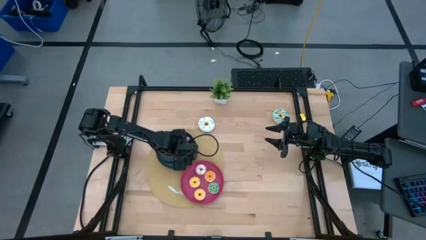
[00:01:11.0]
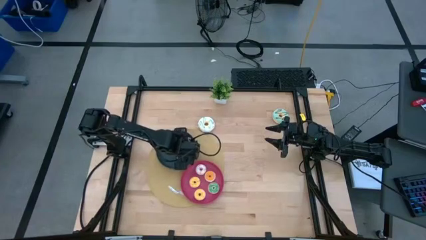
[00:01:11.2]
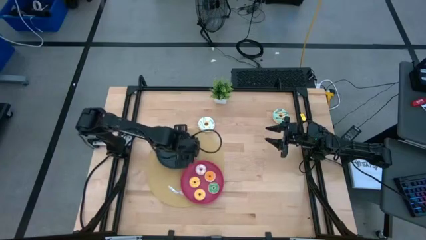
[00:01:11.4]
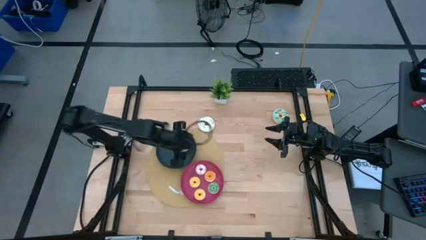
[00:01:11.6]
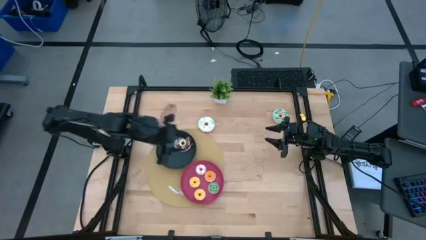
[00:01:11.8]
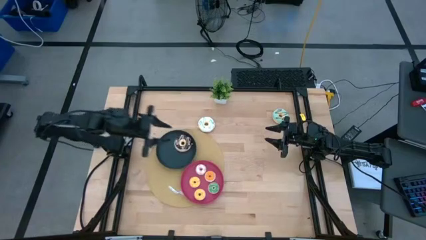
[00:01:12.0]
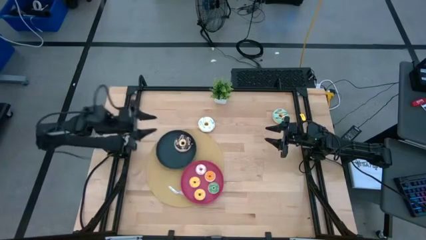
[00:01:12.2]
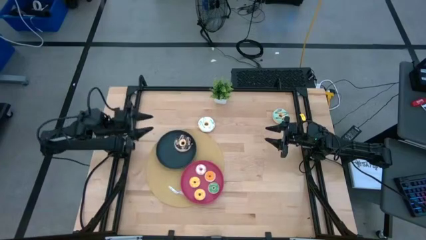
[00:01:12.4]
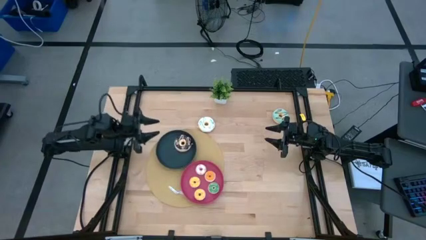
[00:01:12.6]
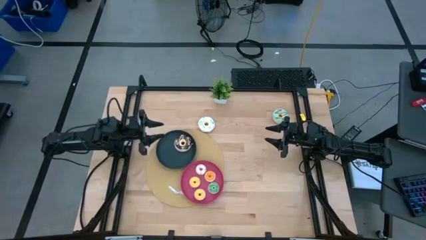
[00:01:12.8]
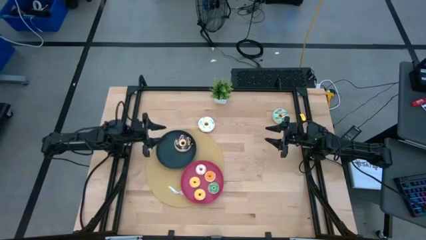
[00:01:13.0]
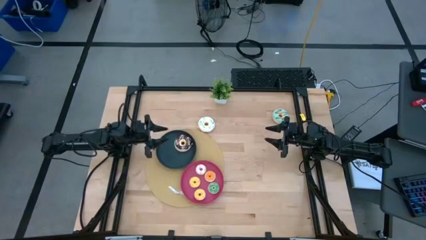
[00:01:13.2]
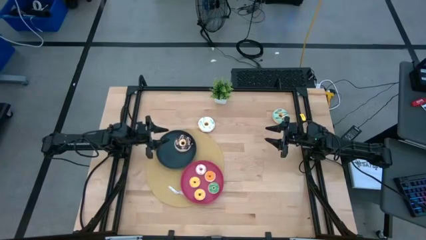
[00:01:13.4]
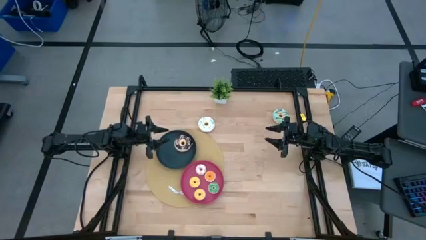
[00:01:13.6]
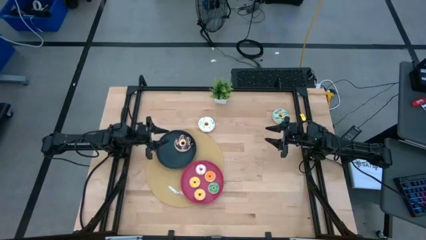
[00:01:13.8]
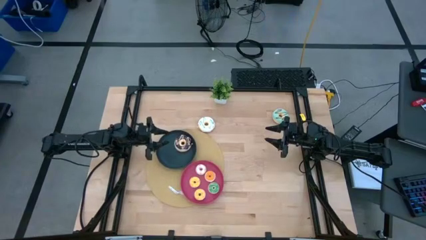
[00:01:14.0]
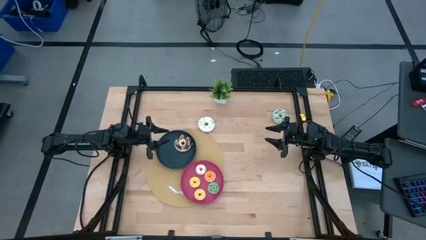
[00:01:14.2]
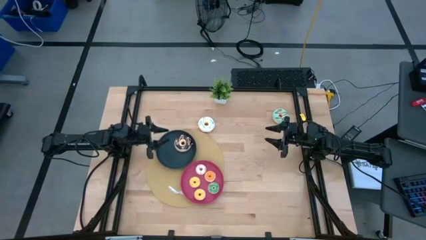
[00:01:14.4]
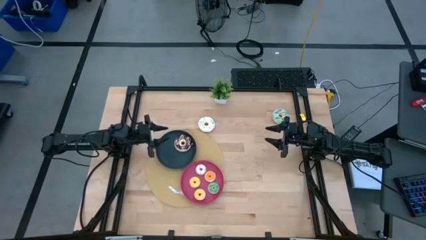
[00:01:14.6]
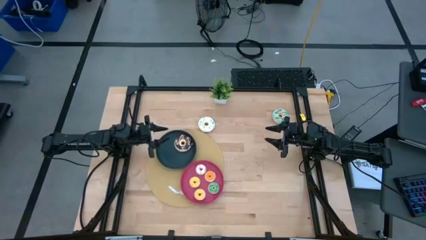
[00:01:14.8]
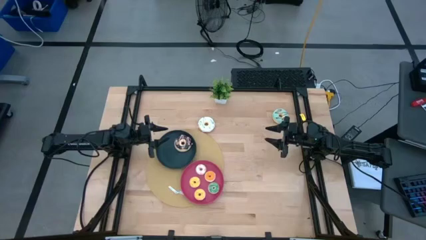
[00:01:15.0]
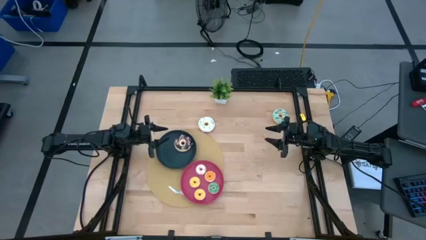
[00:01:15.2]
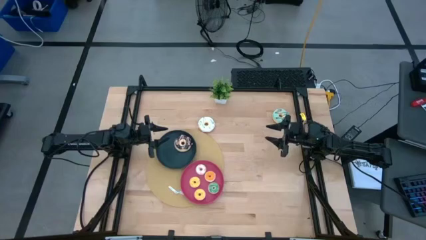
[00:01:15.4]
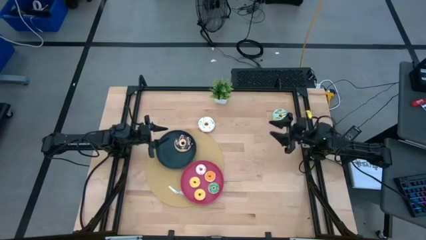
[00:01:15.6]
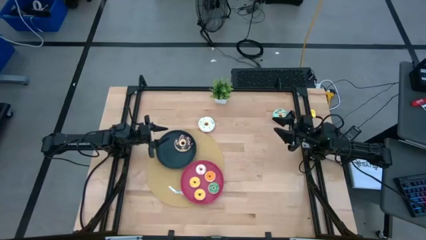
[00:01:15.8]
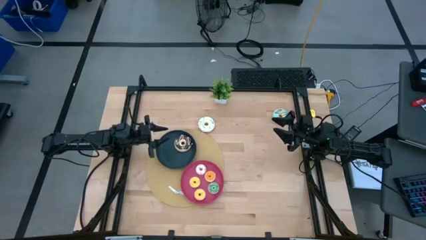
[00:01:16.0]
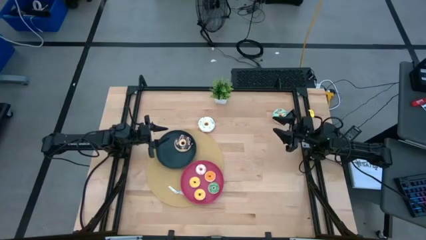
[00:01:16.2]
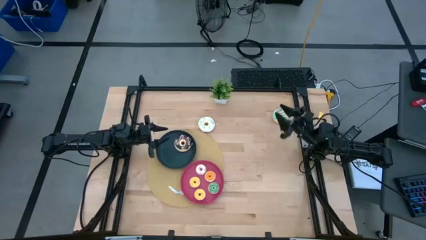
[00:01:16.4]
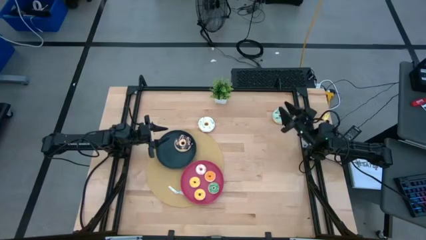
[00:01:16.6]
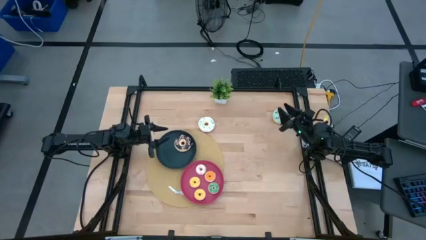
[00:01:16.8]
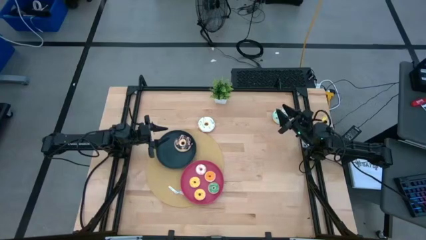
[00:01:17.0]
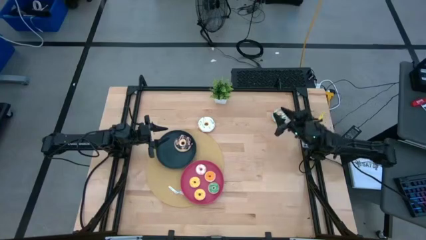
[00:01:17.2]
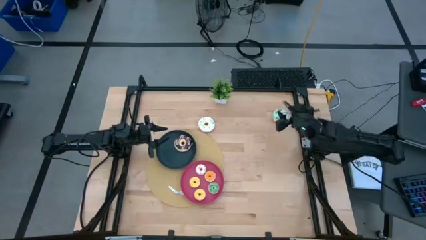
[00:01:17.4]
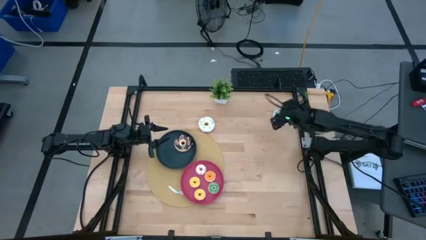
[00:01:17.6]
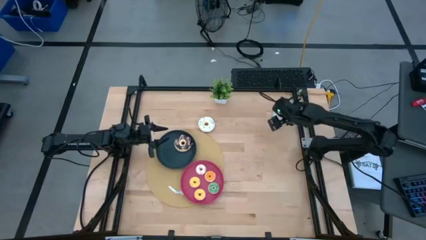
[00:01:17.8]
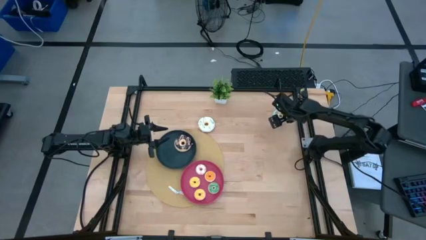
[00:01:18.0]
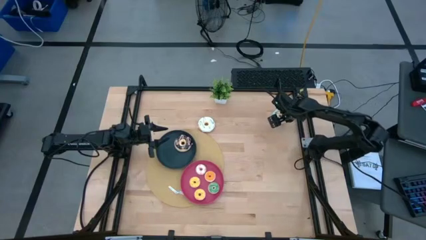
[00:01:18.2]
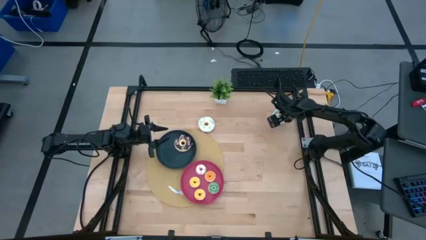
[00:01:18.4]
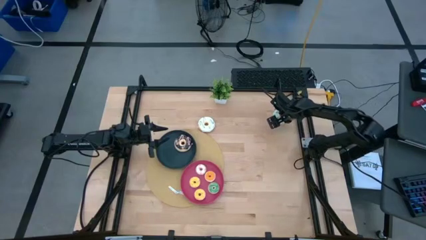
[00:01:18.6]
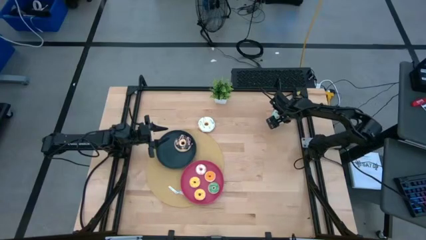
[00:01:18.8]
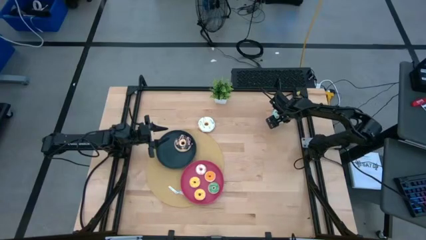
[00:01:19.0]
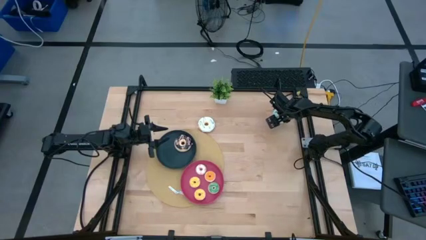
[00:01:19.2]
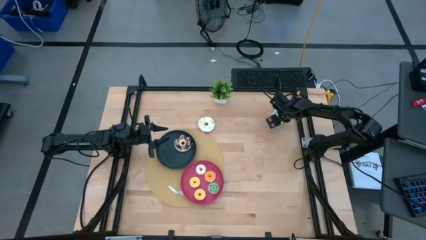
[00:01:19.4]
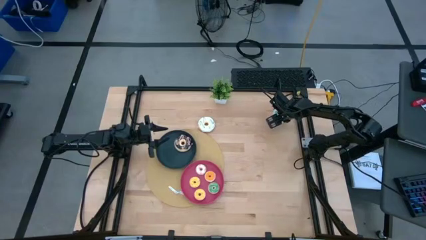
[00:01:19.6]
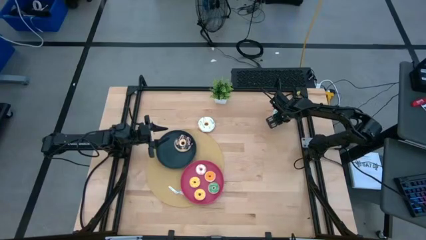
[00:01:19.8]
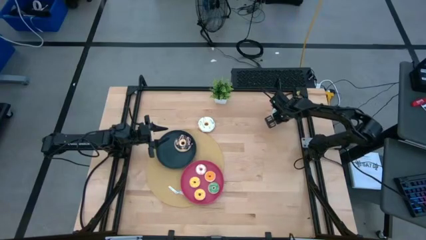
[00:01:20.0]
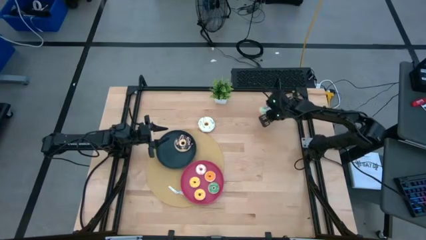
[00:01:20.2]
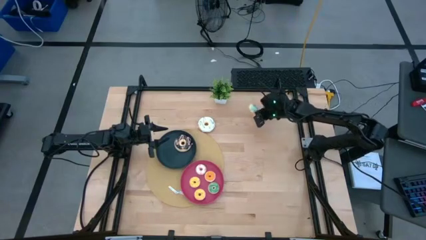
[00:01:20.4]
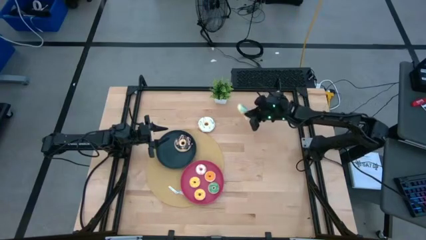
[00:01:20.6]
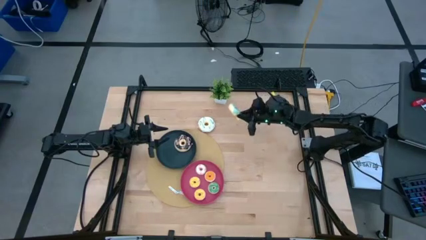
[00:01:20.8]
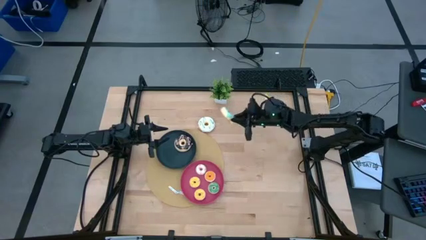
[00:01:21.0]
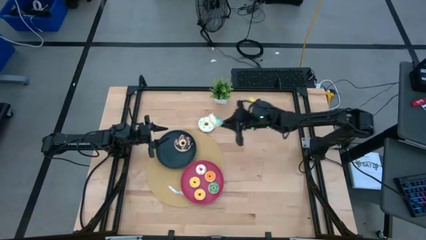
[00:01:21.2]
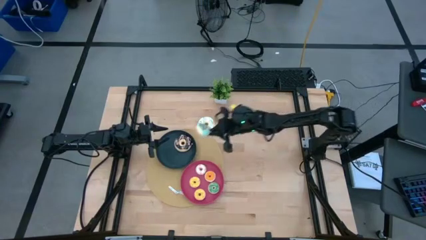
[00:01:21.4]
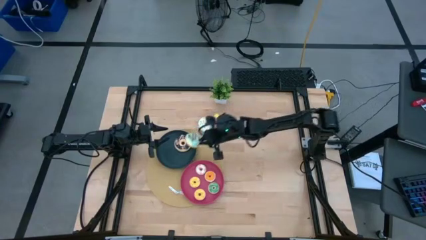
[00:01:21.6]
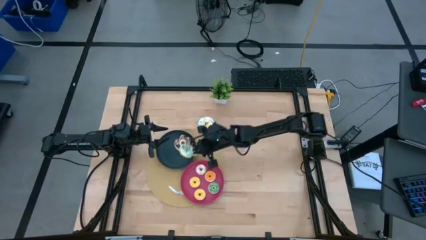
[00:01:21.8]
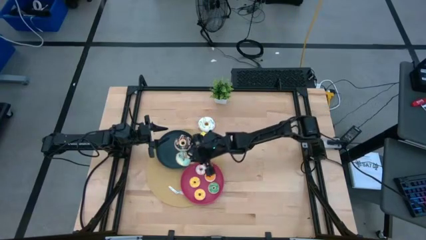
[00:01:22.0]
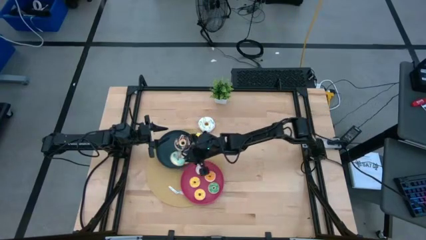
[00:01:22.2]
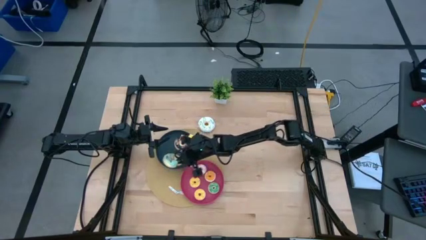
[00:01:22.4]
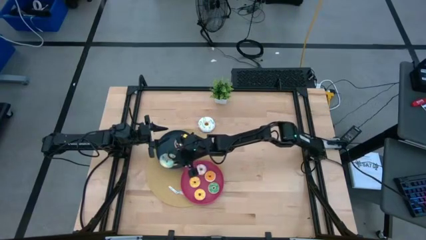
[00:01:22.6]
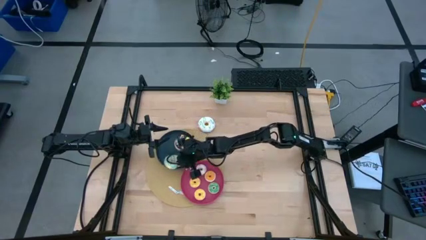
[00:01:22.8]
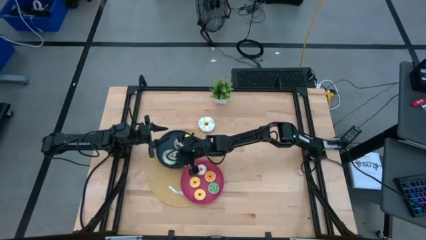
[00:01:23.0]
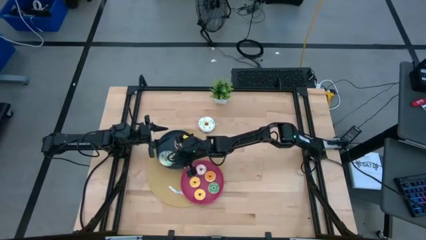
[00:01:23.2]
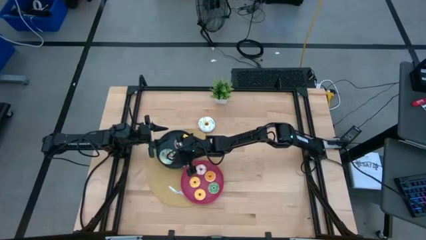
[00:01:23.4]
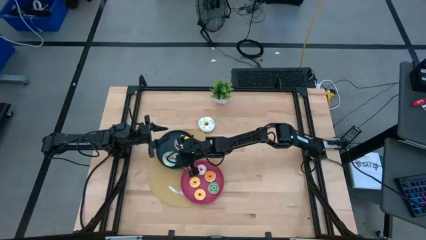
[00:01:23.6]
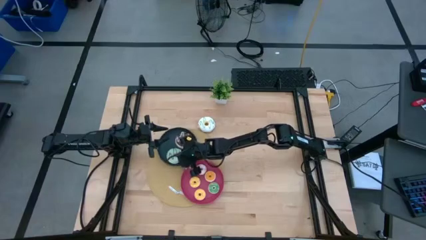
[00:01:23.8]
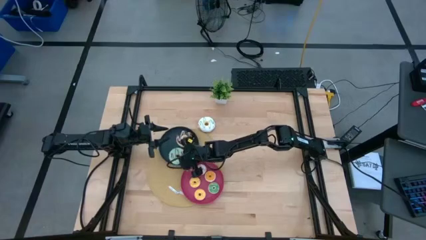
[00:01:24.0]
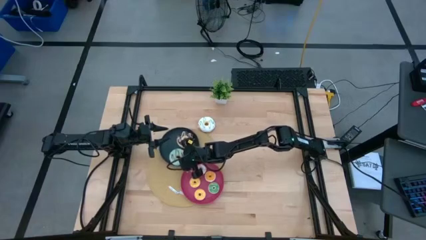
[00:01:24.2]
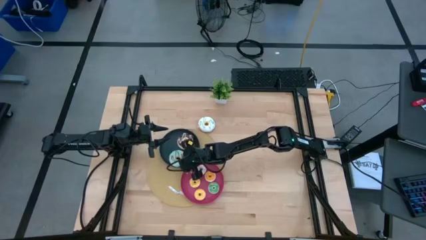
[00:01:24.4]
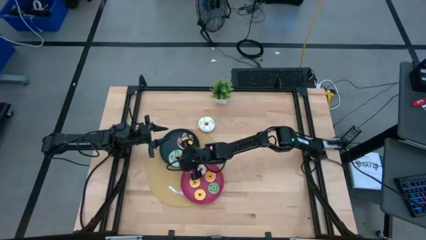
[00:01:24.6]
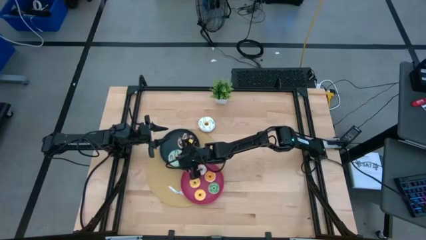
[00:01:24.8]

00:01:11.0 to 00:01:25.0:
Task: Pick & Place donuts
Put the large blue donut into the black plate
